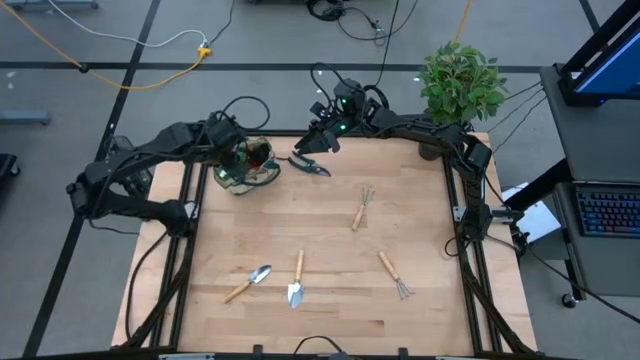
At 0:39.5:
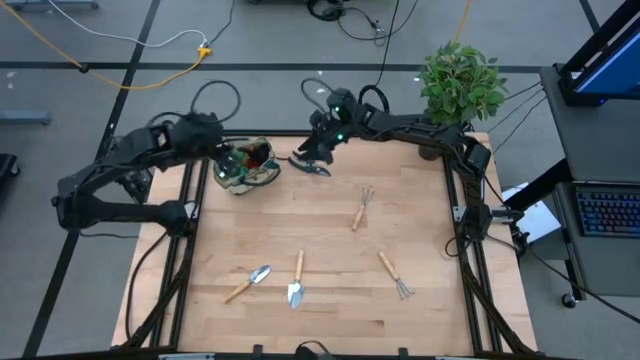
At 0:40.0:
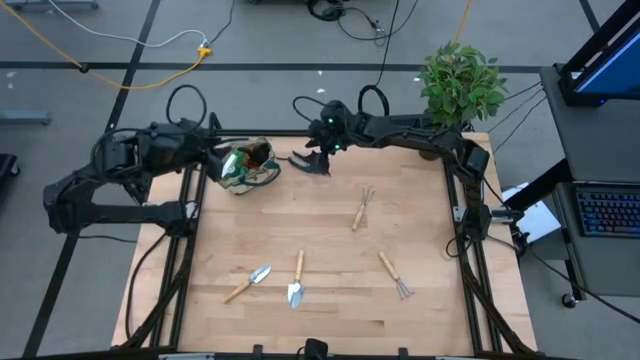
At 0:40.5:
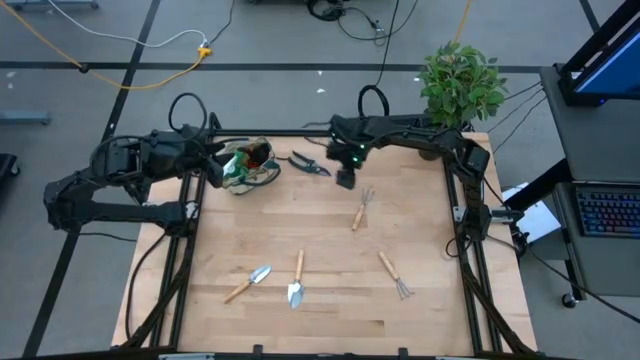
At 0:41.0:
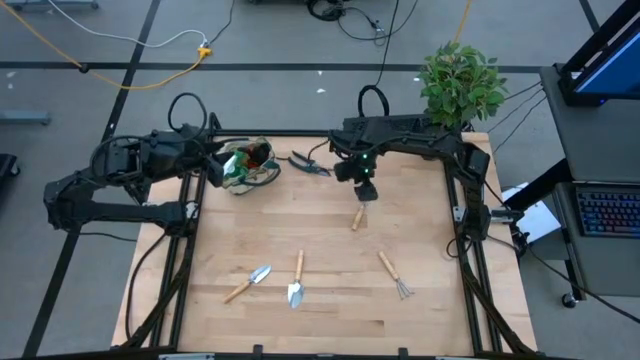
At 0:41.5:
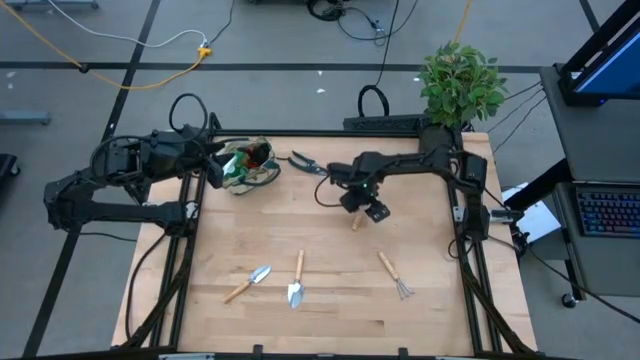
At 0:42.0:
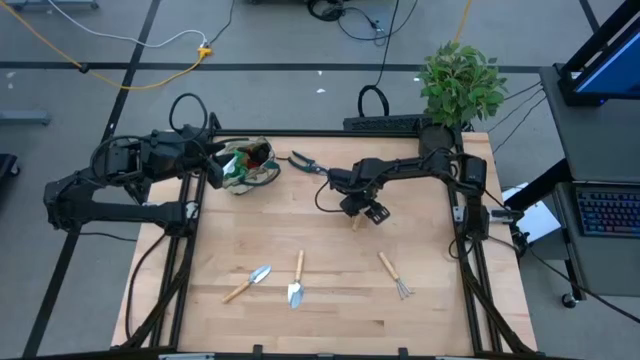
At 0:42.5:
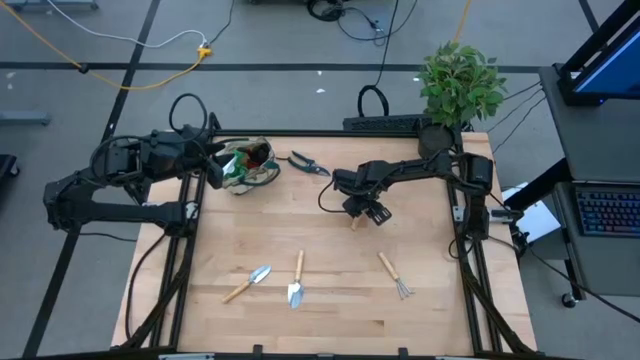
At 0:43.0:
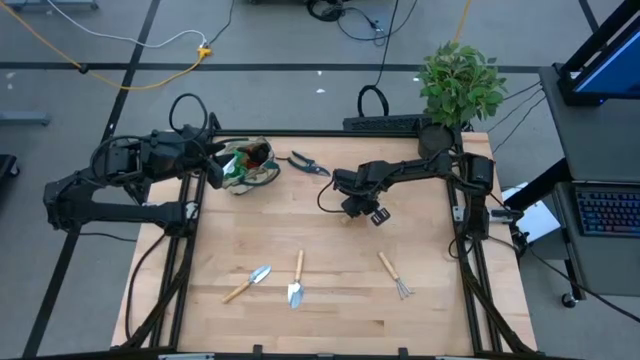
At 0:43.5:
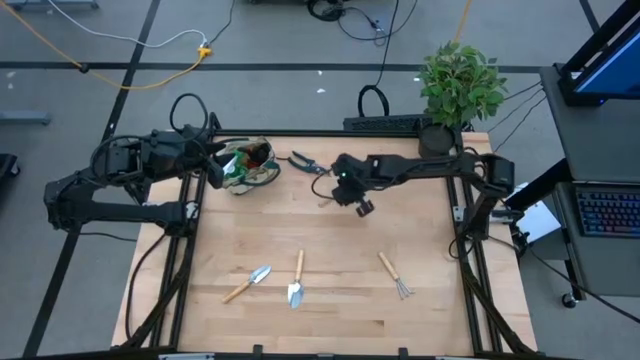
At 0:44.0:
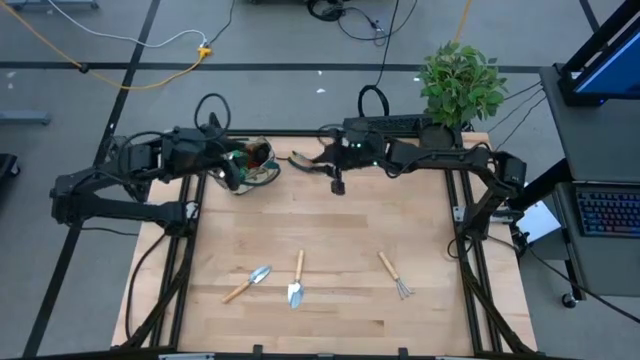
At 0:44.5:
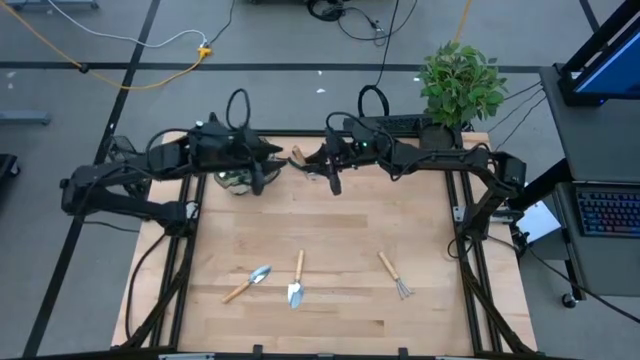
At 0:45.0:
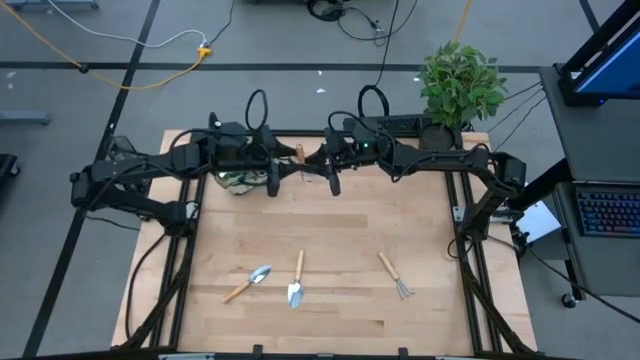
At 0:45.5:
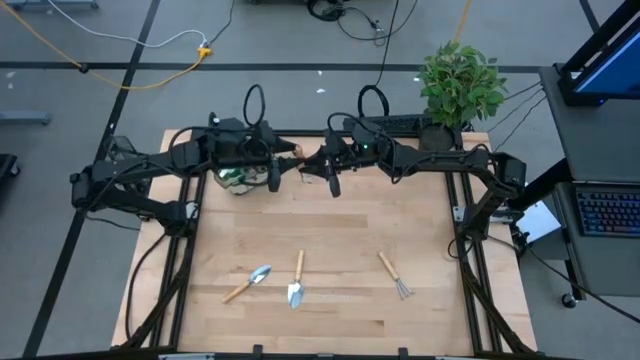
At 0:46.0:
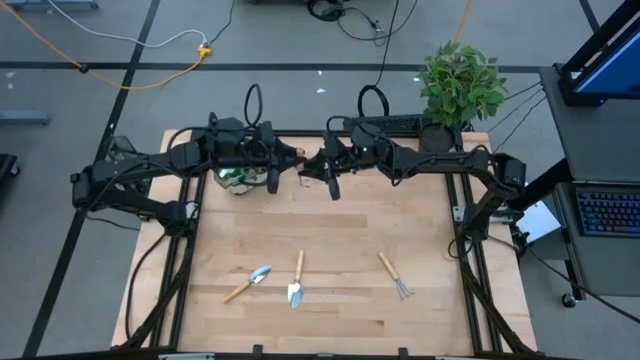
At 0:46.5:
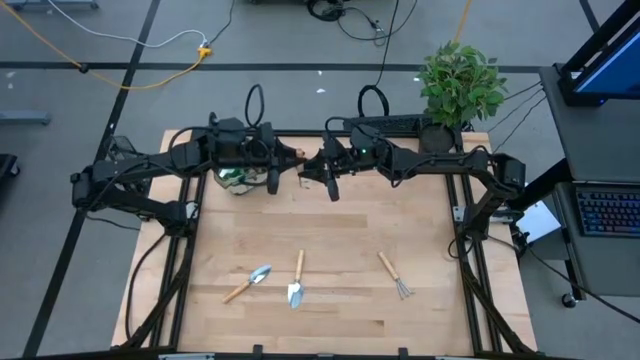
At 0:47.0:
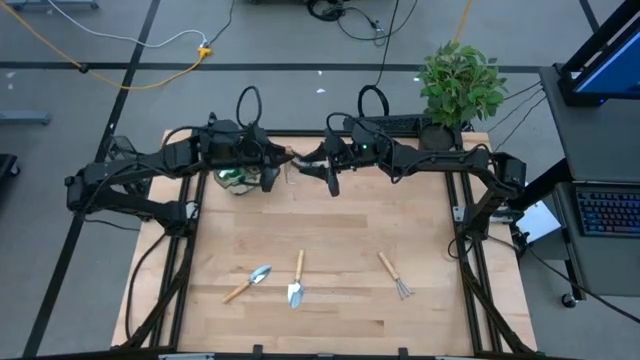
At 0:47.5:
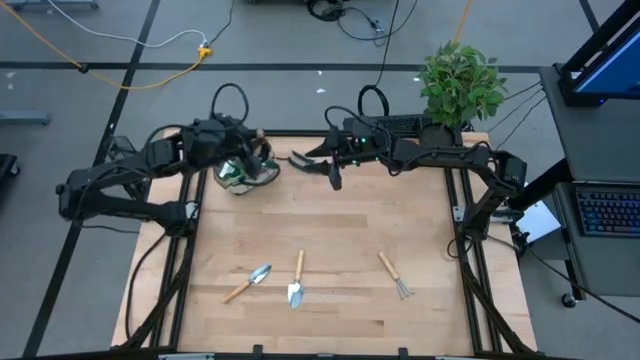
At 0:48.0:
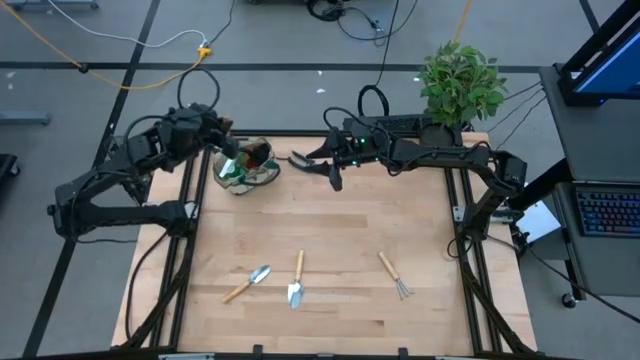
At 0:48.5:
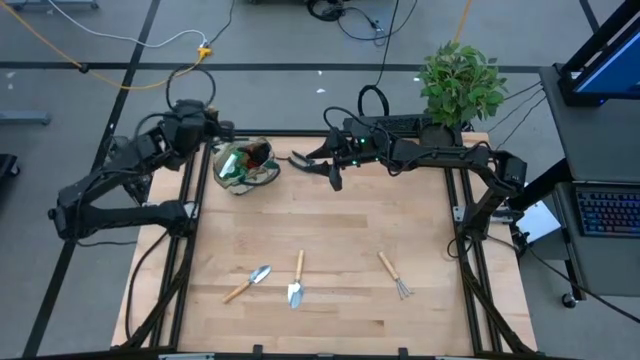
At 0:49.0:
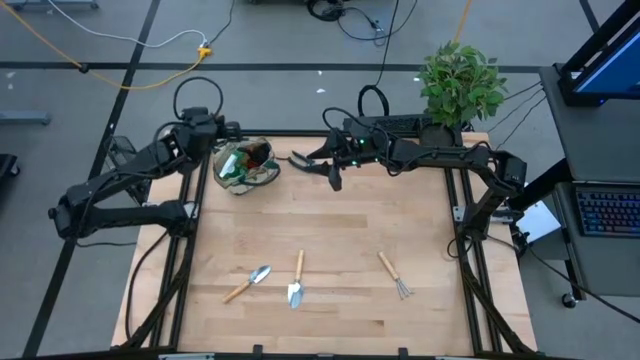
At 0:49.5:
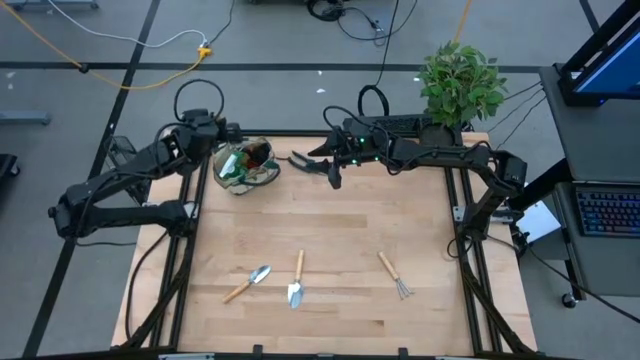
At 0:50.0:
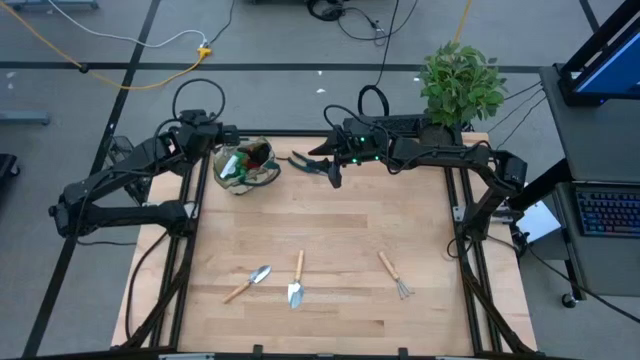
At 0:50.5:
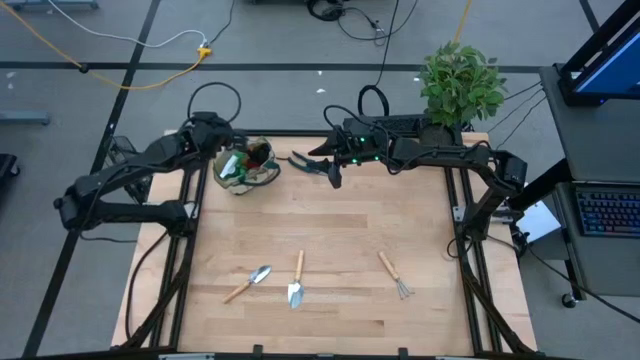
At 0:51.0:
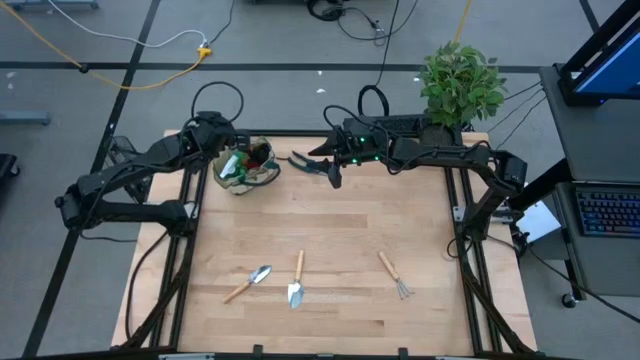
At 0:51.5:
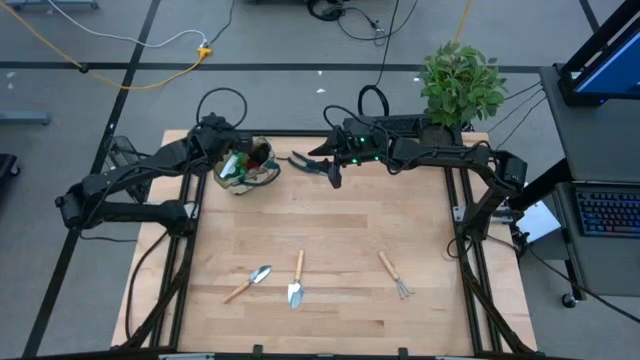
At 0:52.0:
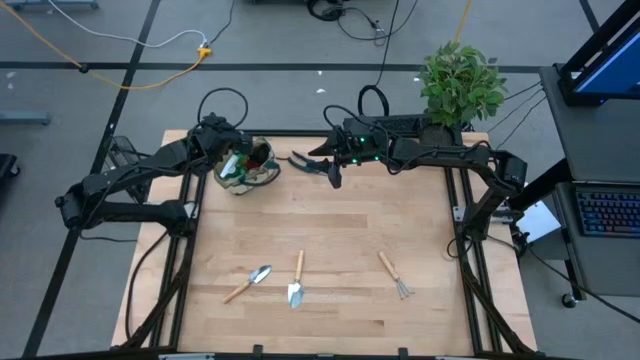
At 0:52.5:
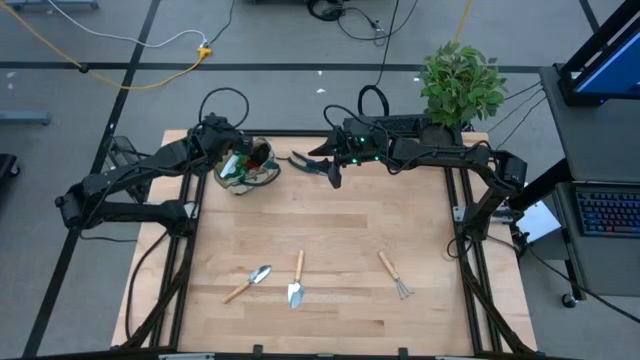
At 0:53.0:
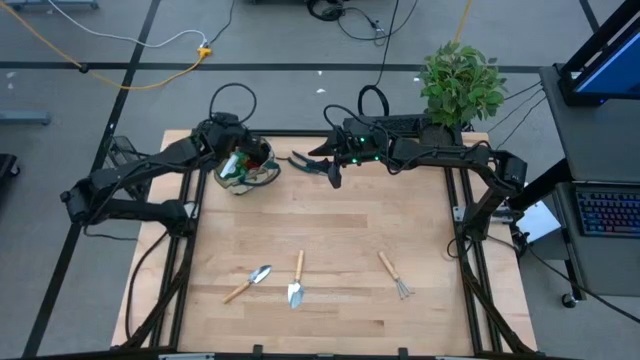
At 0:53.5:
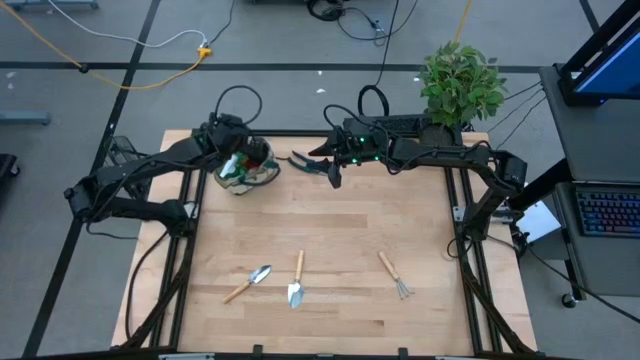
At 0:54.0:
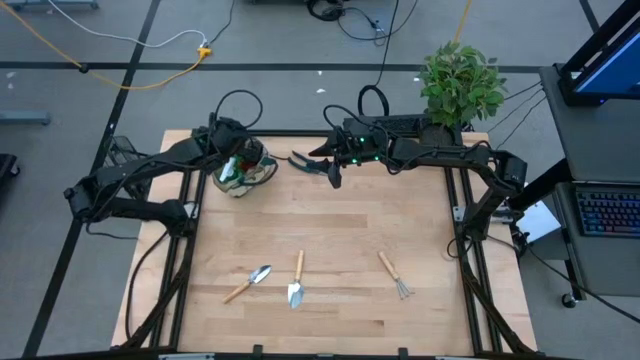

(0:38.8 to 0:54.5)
Task: Pick & Place Garden tools in Gardening bag
Put the top hand rake into the gardening bag

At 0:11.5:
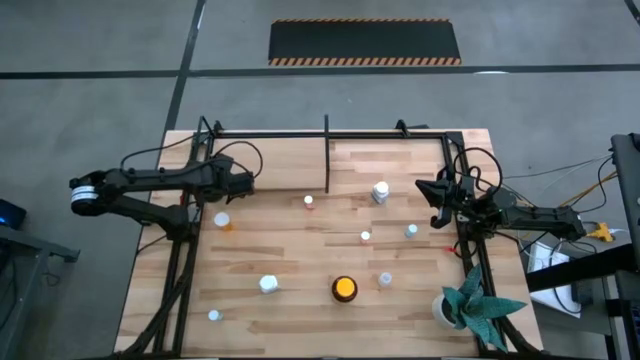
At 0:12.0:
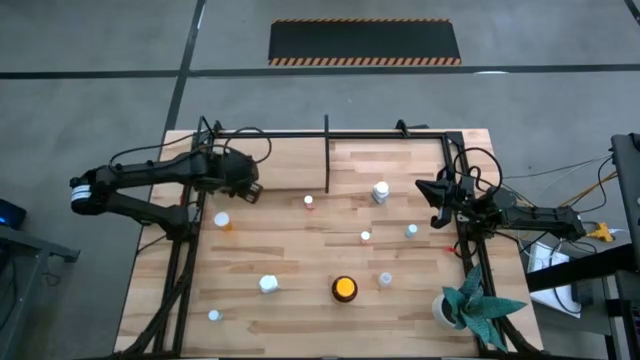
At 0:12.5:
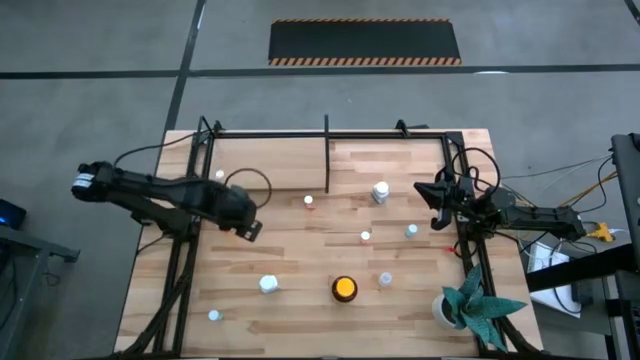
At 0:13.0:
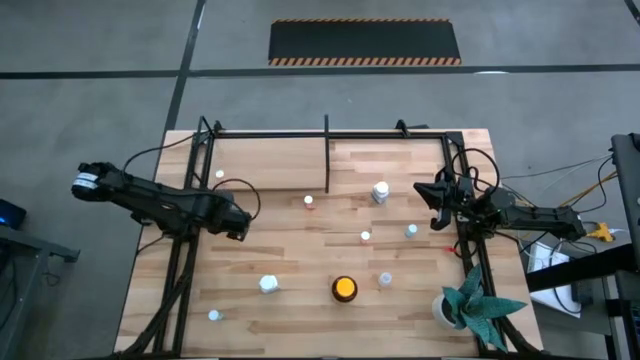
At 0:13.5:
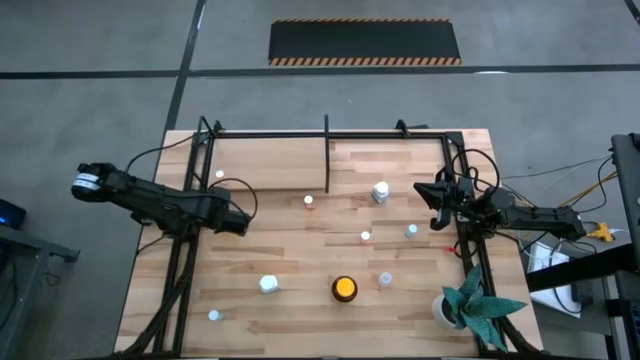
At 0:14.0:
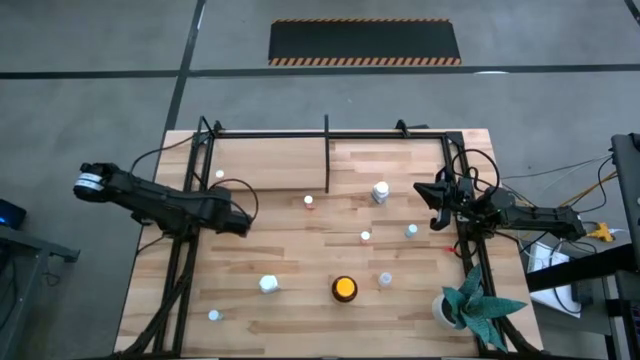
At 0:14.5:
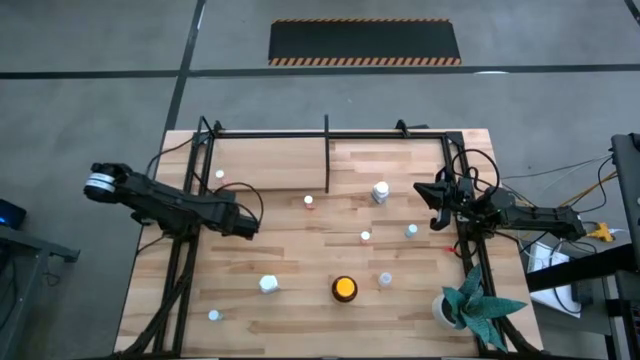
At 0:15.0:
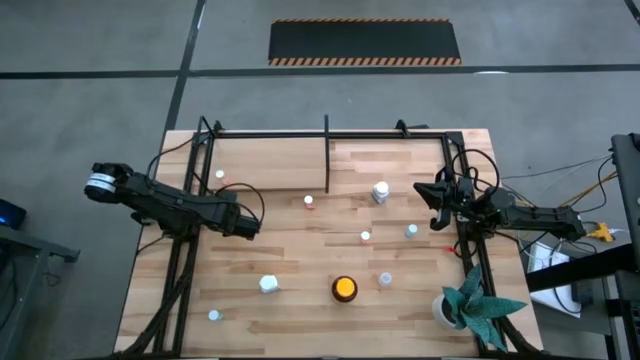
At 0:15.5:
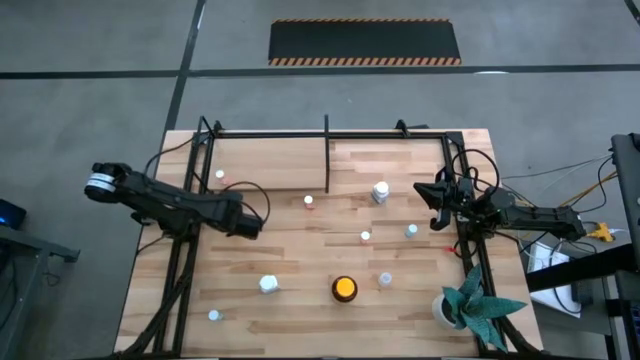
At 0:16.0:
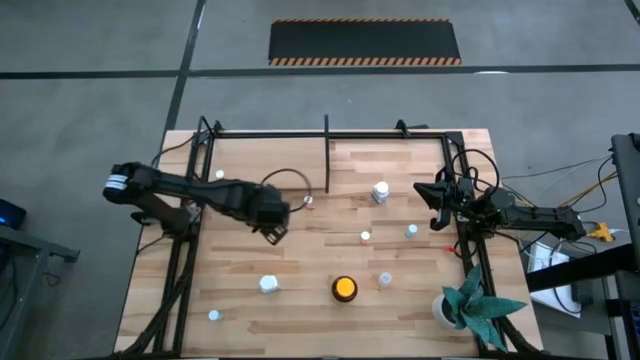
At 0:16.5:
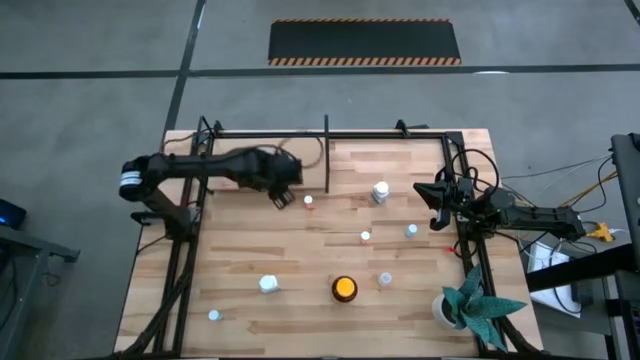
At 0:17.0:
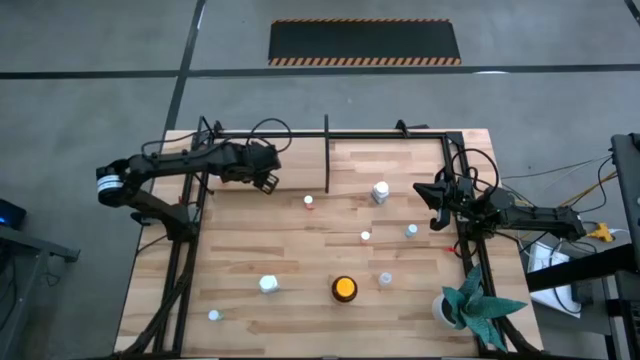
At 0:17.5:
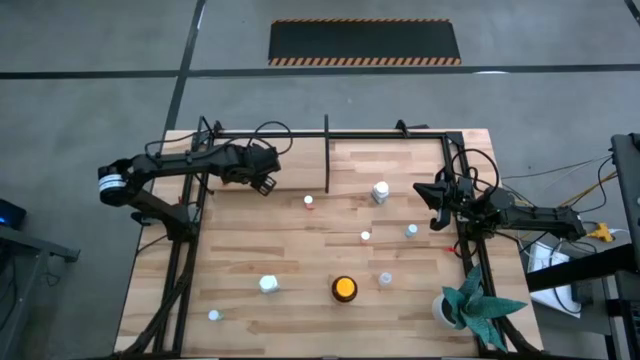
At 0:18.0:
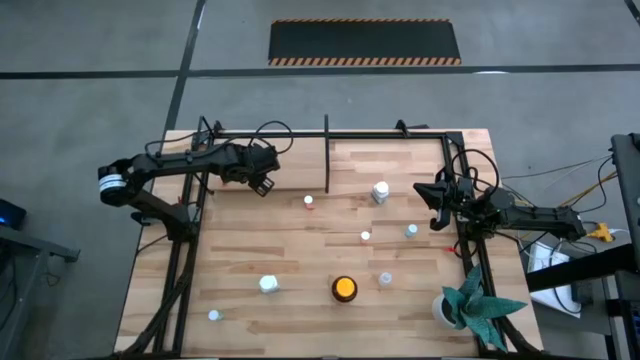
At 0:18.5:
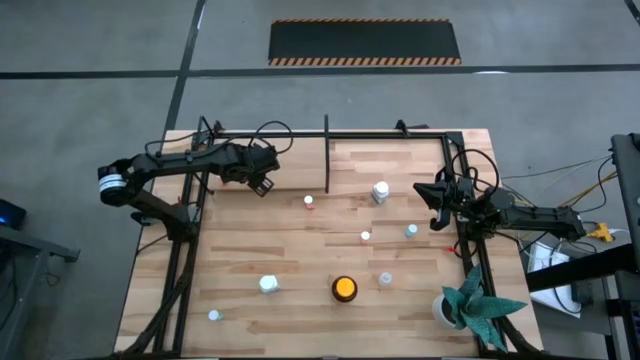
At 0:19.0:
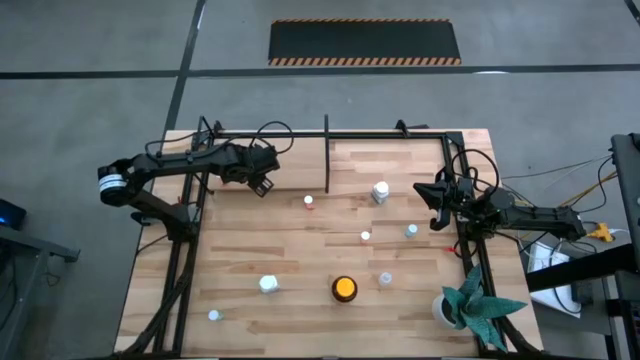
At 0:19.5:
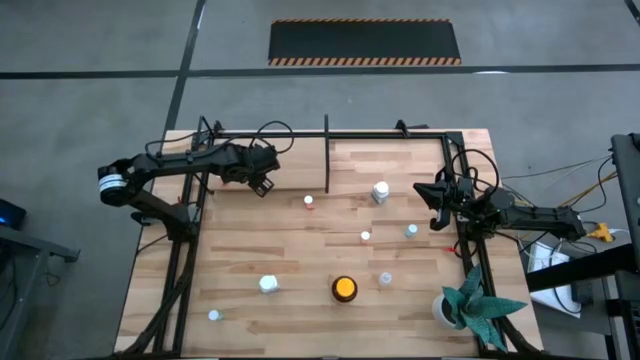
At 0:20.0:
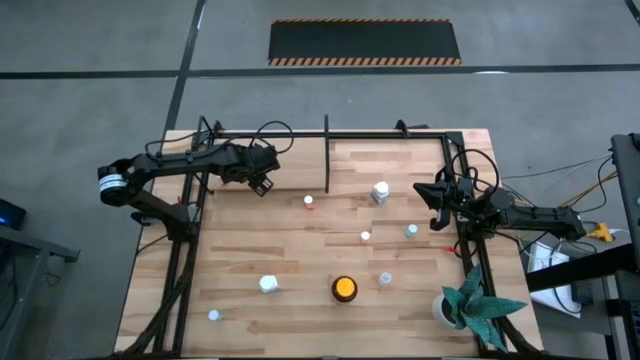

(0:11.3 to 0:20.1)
Task: Pick and place medicine bottles onto shelf by color
Put the orange pill bottle on the shelf
